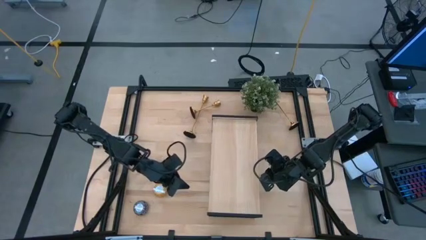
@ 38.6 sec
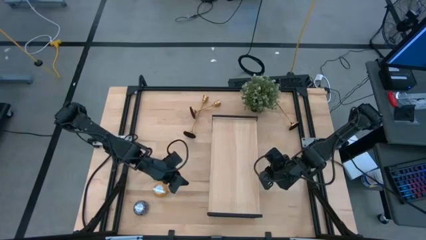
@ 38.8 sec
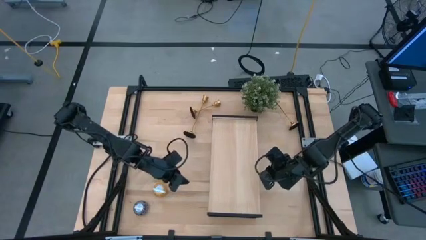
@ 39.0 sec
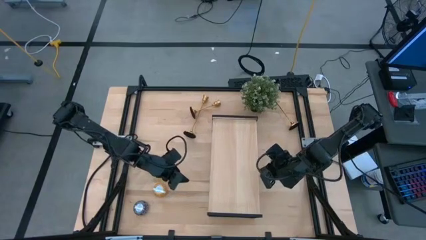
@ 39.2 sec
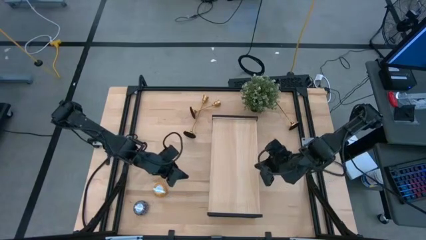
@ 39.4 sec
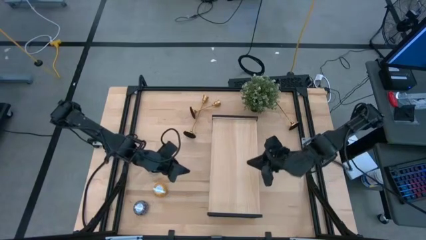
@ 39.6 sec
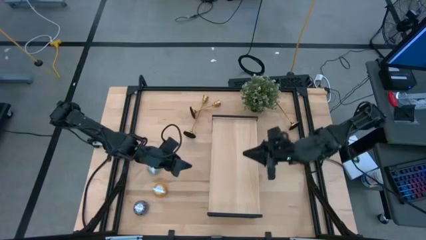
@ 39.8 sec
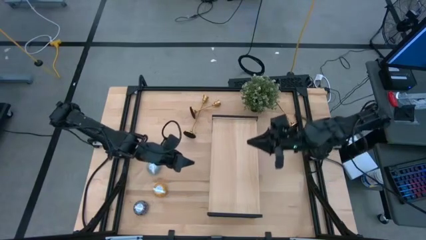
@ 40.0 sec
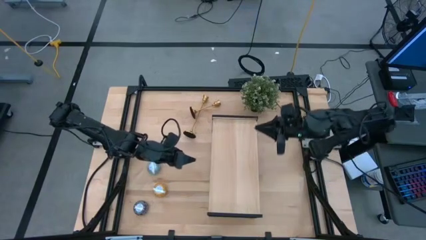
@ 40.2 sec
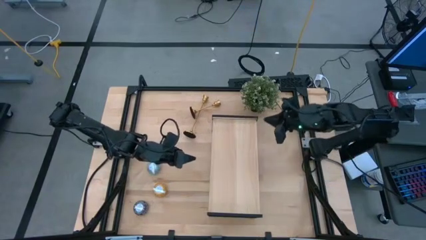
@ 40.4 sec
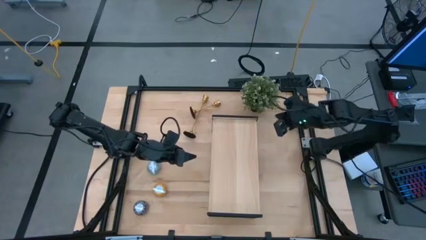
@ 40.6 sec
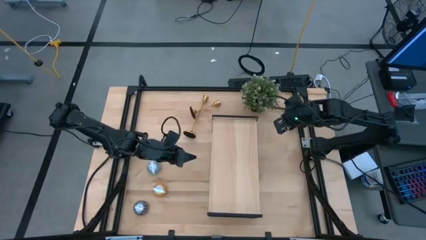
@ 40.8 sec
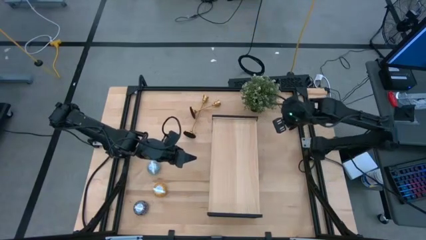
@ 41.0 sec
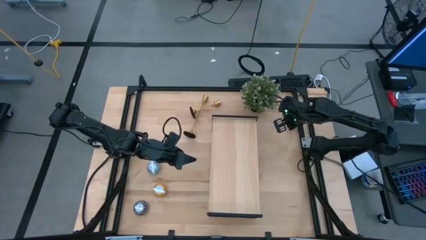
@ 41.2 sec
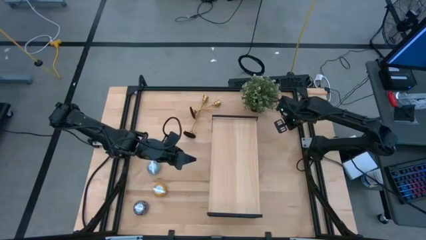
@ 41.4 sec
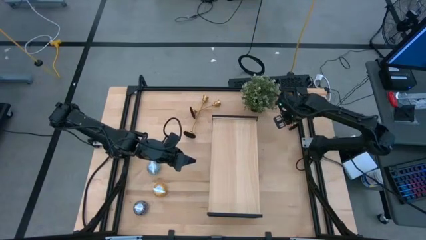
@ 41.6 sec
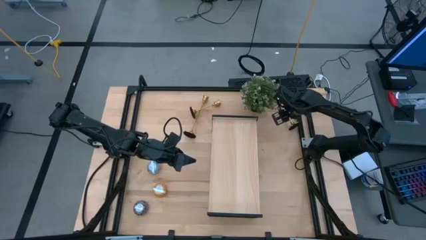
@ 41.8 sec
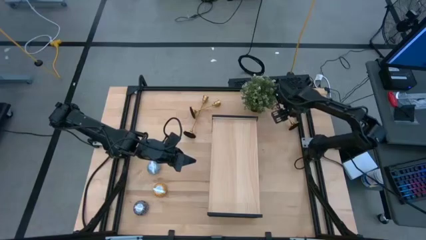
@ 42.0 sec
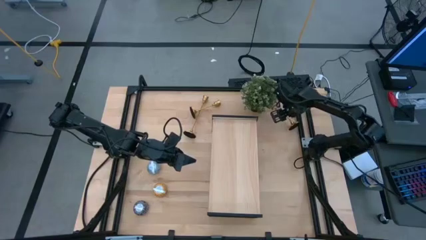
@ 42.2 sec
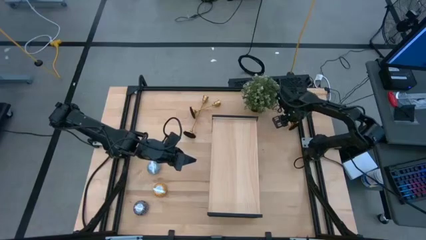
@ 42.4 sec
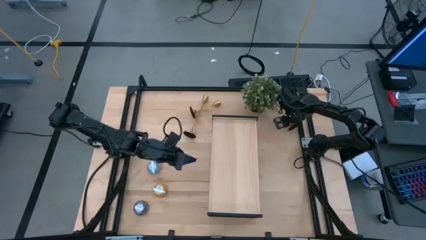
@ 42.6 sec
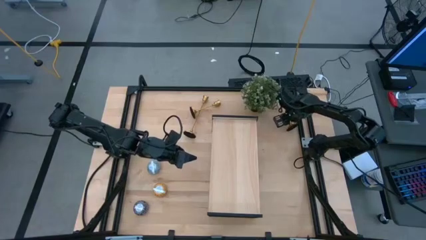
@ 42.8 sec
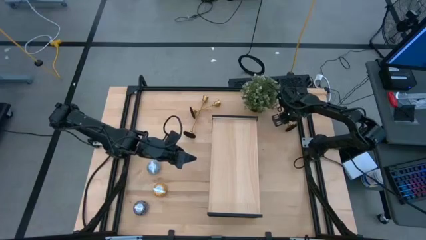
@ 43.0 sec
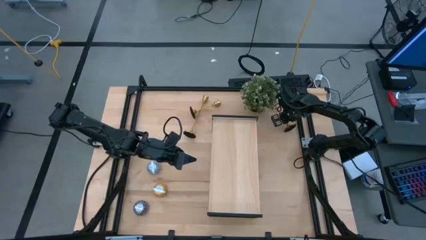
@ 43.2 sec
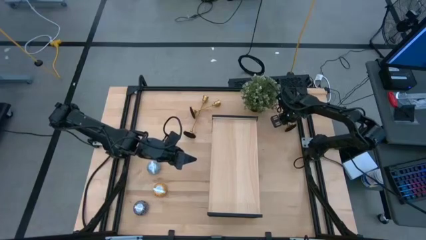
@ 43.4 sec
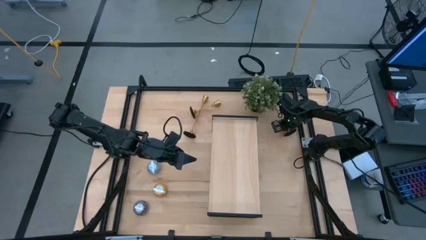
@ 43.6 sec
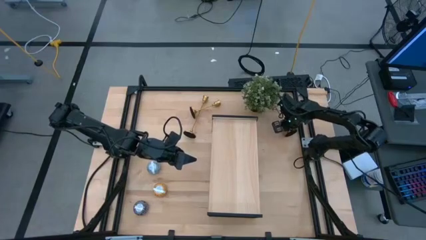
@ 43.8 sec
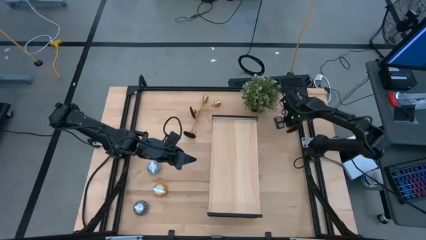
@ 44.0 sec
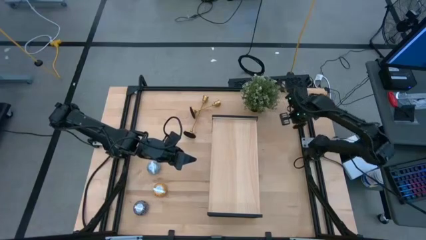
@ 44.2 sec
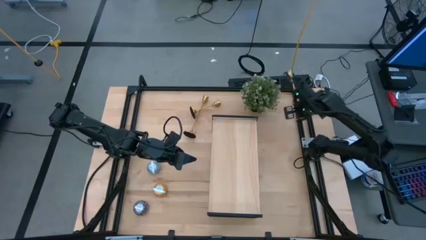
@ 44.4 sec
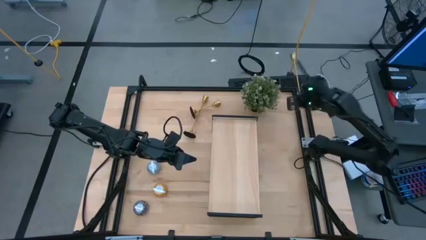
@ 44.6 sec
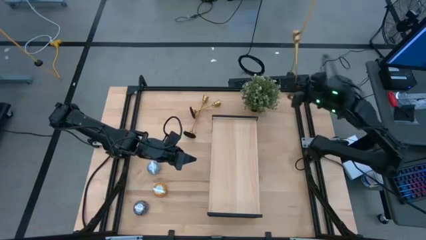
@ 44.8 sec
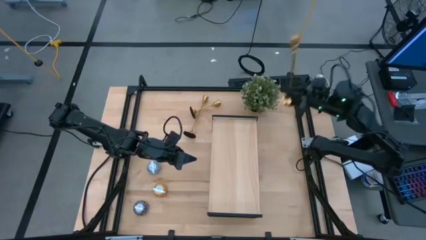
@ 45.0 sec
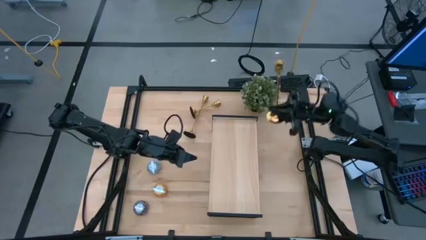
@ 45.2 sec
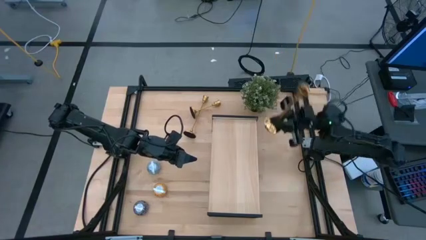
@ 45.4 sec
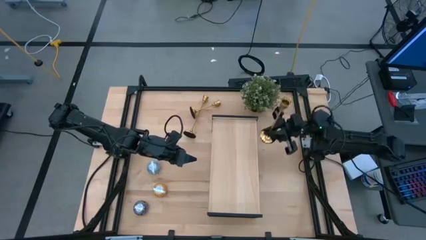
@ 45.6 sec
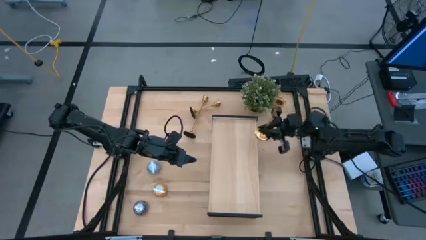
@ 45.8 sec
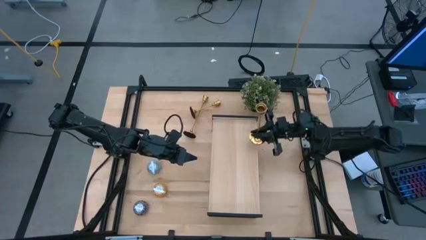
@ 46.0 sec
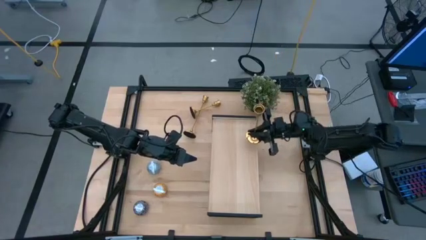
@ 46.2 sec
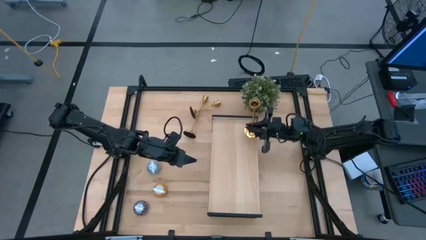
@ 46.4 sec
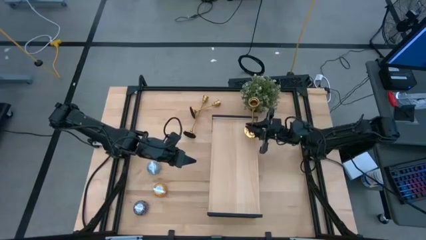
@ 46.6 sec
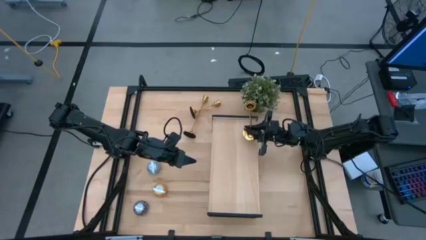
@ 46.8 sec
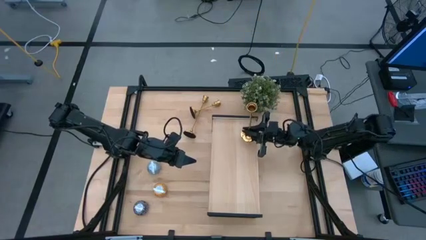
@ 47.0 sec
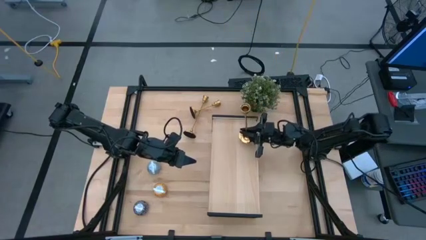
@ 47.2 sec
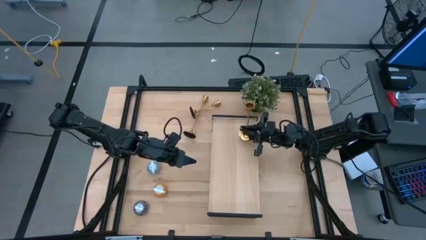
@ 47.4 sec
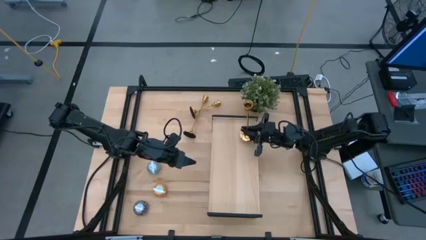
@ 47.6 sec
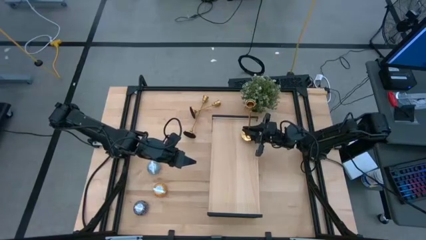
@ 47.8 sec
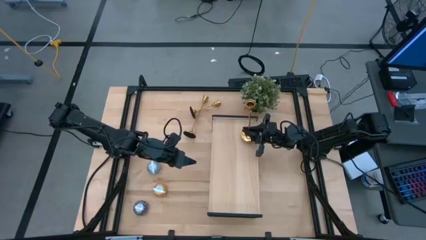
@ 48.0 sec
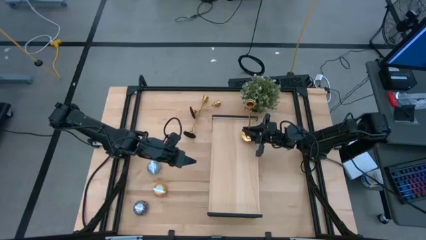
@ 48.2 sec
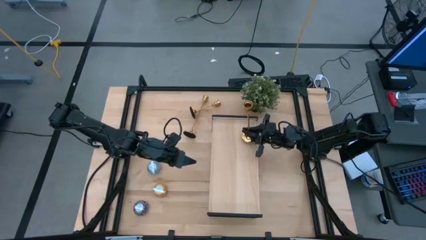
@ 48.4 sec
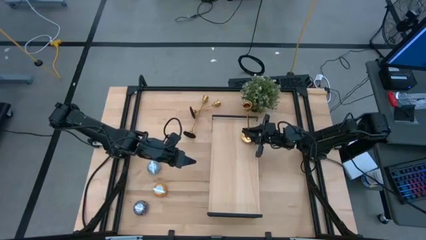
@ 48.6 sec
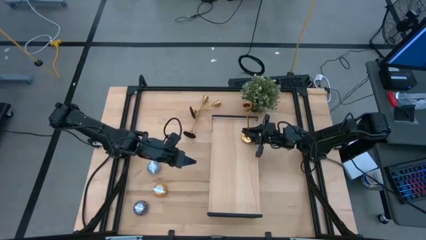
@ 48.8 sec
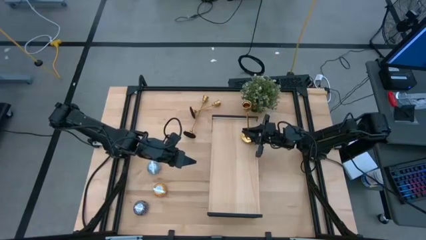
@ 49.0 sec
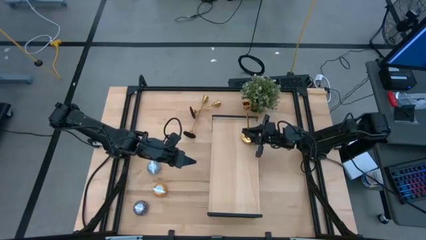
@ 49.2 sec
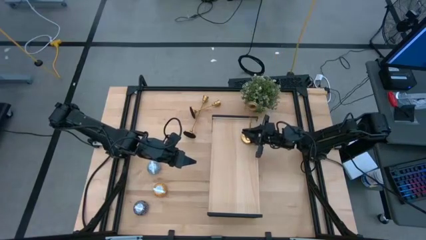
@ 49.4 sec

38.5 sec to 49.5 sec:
Task: Pick & Place candle stick holders
Put the right gold candle holder on the shelf
